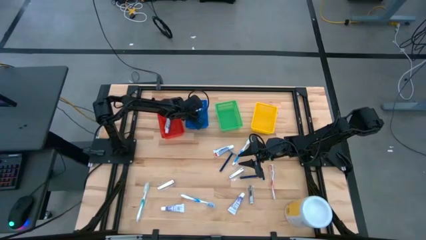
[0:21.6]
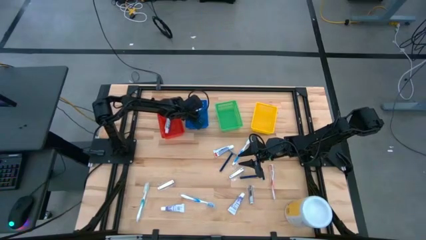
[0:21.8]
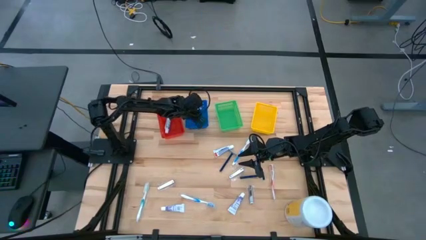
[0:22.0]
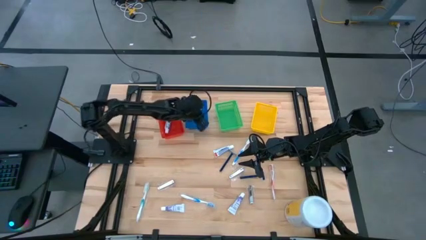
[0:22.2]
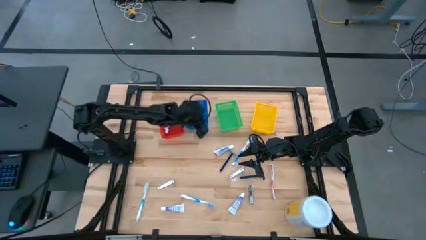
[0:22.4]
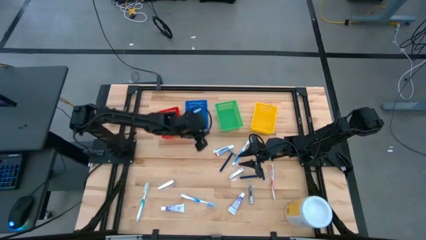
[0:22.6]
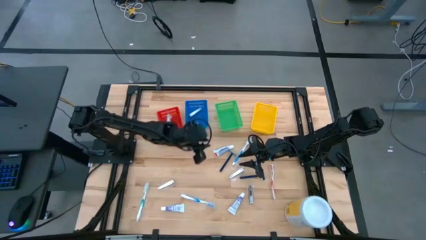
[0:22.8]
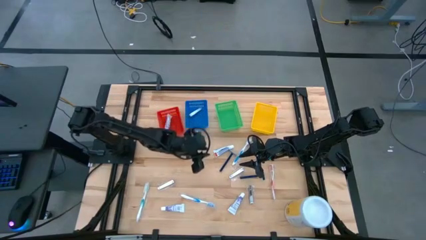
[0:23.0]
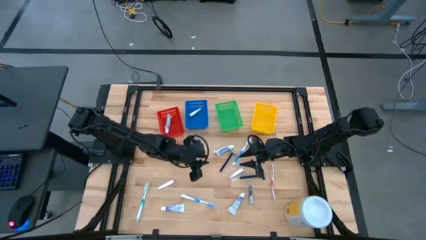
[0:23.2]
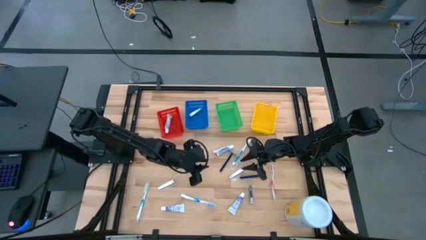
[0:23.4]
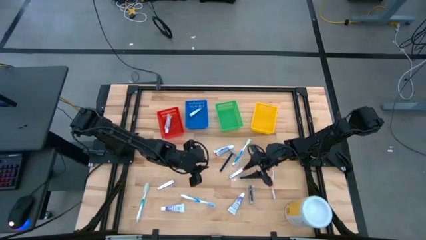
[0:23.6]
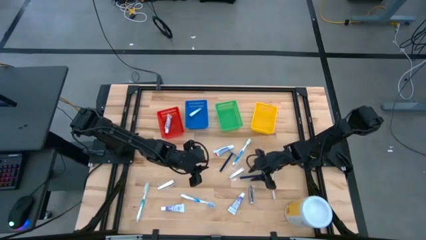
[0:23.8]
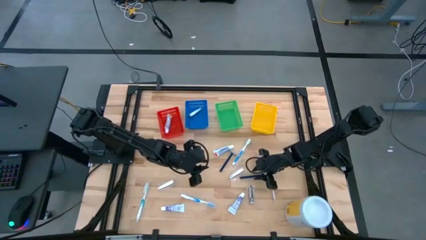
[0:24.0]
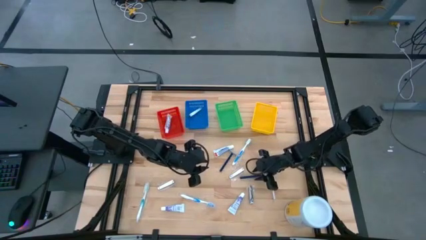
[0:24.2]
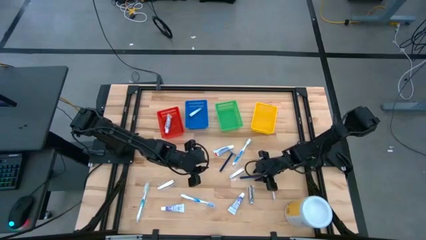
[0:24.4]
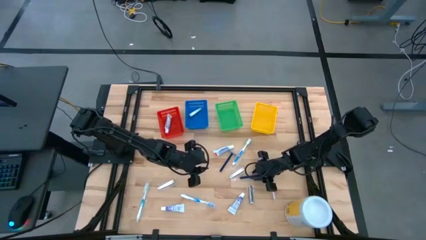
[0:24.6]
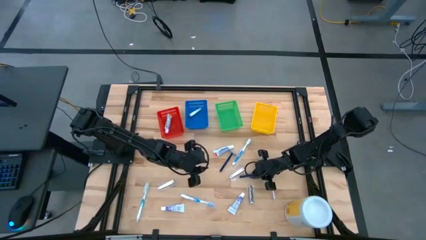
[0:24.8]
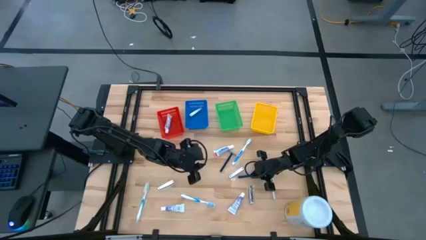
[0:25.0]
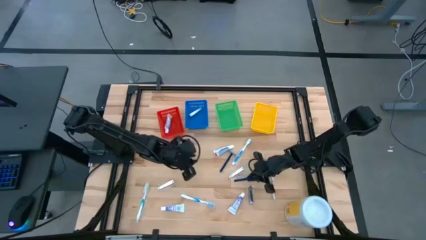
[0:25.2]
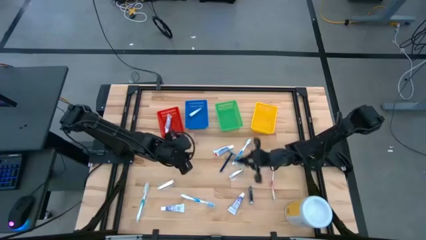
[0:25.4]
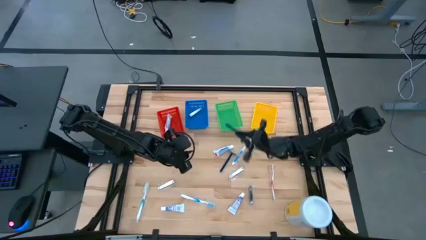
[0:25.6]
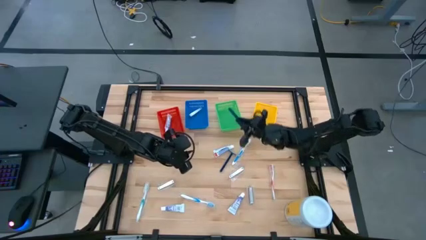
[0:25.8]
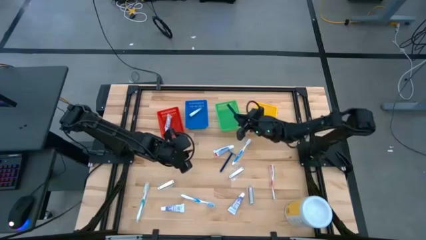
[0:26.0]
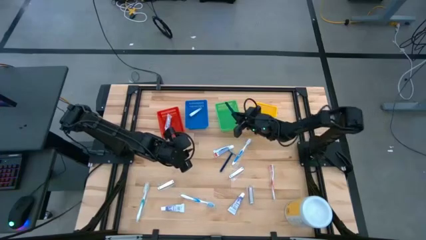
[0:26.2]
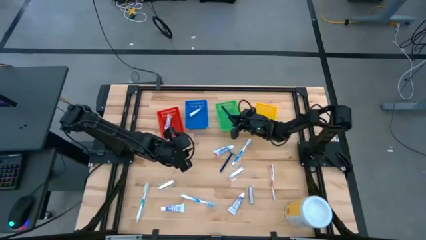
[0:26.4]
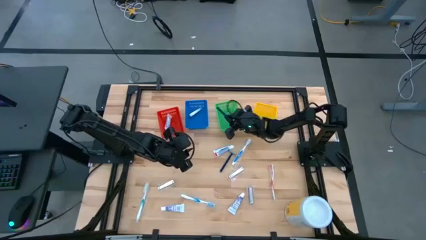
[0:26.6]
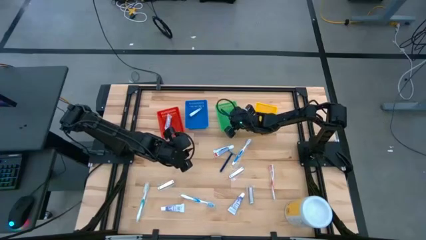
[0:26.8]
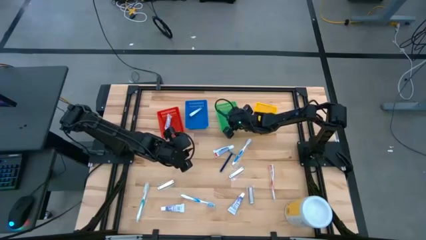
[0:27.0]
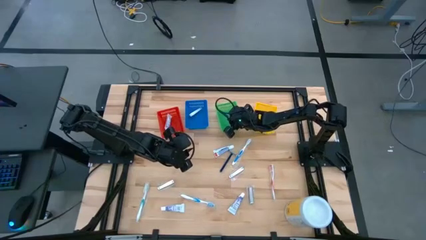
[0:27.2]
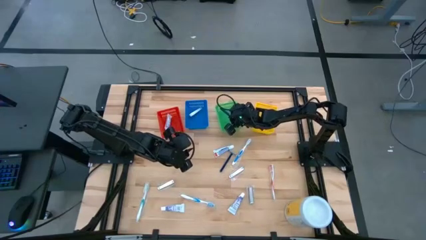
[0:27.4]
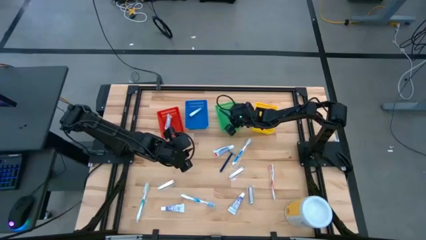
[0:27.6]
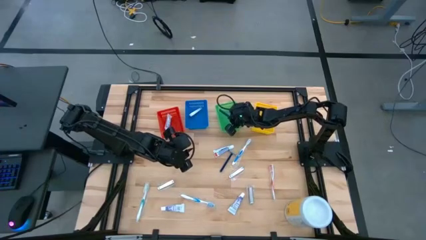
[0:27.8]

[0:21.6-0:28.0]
Task: Pick & Place Travel size toiletries
Put the razor into the green bin

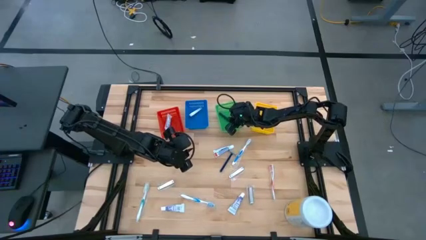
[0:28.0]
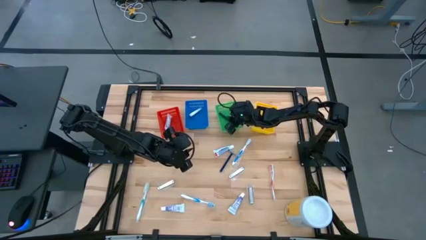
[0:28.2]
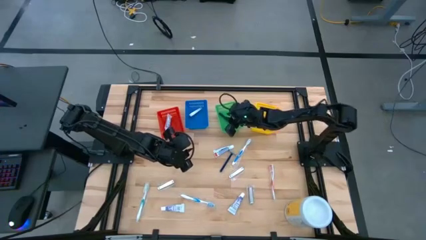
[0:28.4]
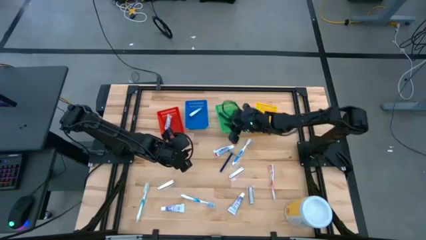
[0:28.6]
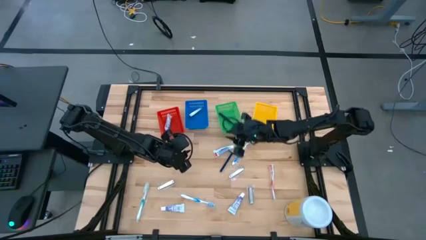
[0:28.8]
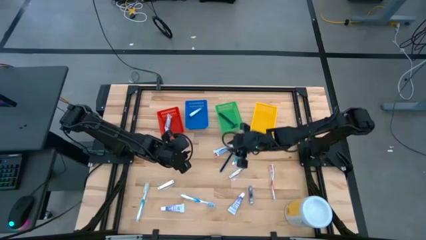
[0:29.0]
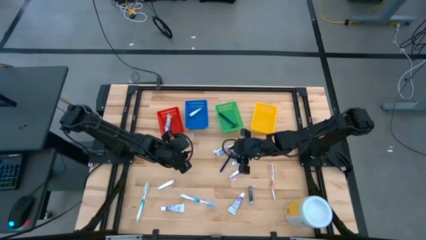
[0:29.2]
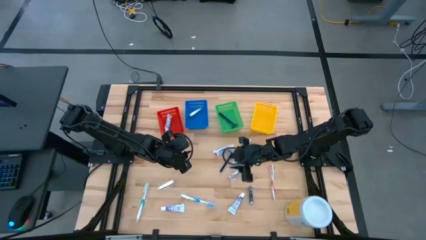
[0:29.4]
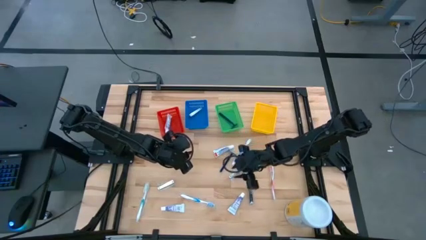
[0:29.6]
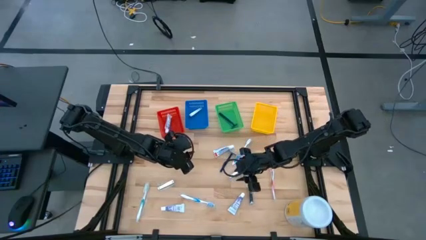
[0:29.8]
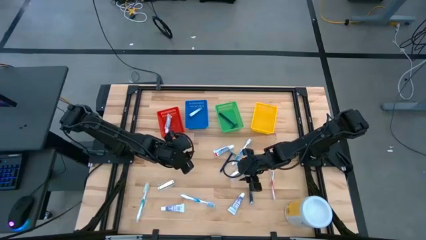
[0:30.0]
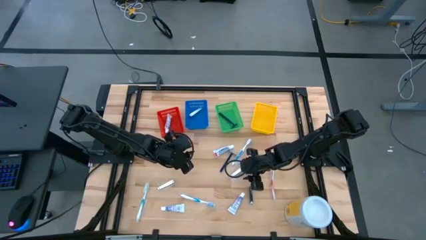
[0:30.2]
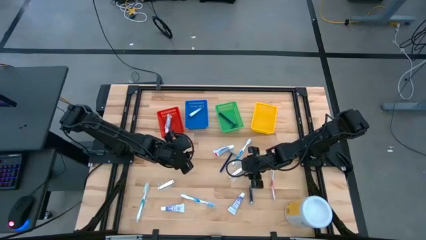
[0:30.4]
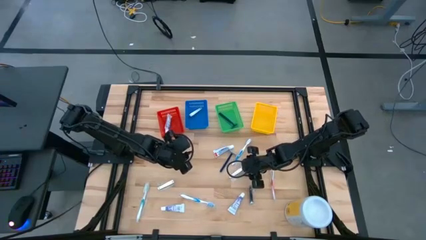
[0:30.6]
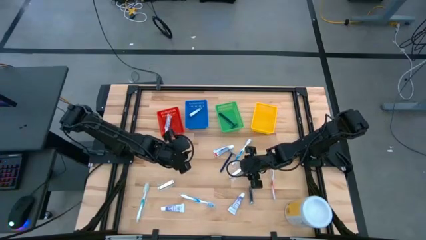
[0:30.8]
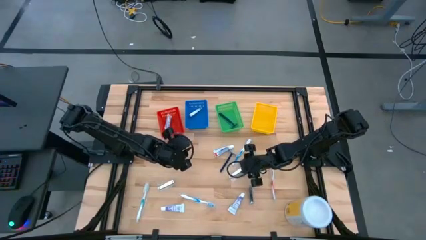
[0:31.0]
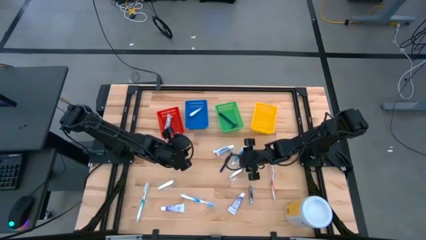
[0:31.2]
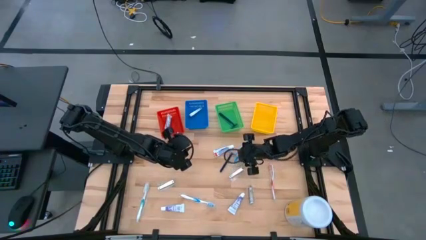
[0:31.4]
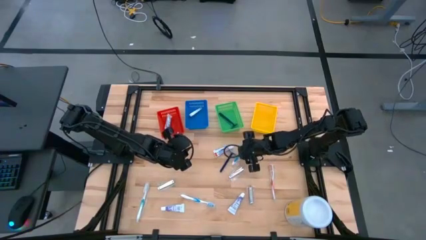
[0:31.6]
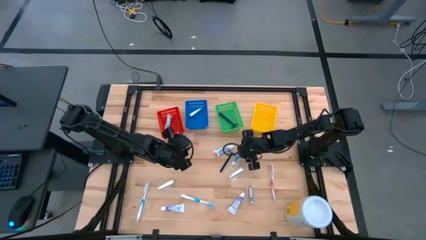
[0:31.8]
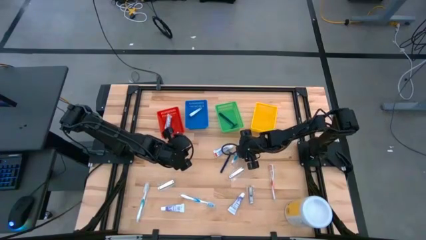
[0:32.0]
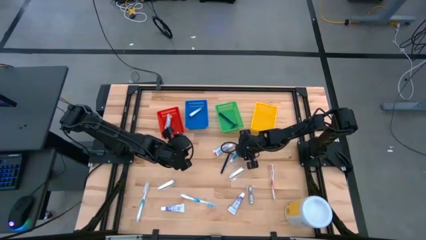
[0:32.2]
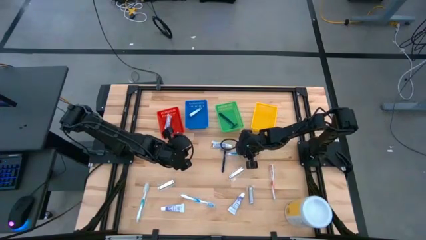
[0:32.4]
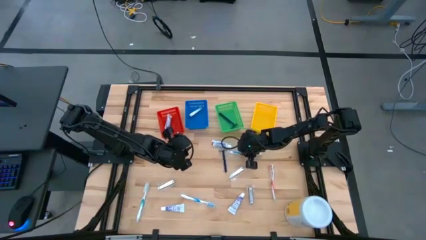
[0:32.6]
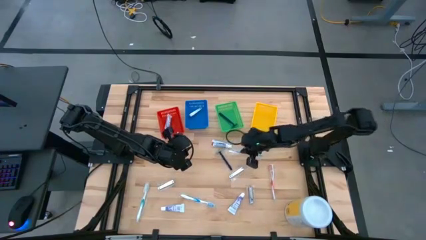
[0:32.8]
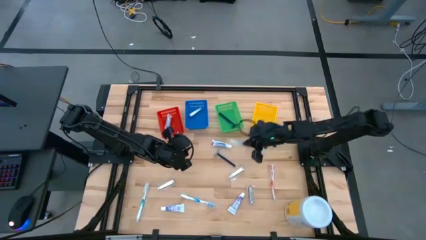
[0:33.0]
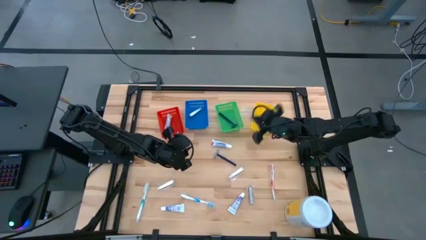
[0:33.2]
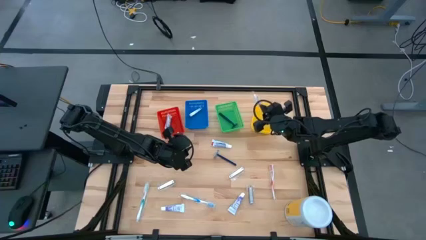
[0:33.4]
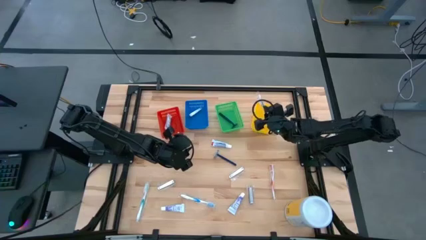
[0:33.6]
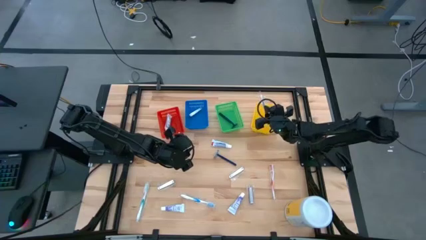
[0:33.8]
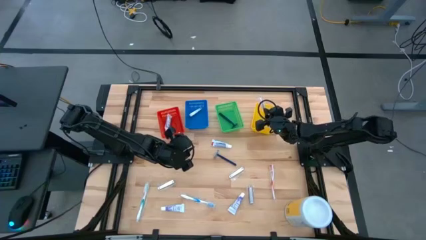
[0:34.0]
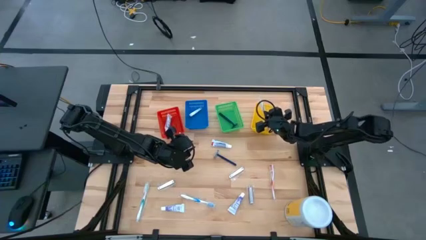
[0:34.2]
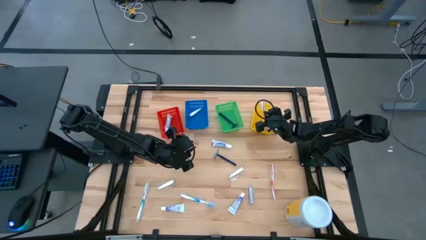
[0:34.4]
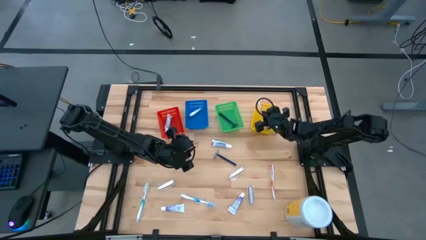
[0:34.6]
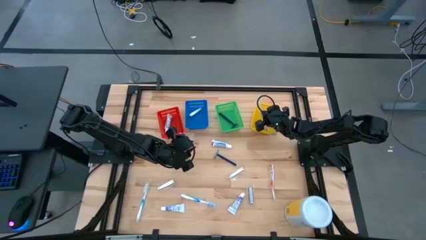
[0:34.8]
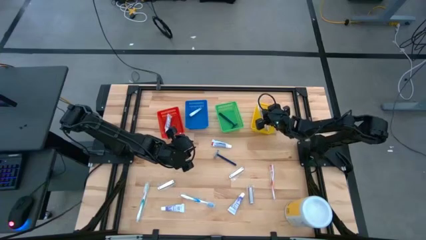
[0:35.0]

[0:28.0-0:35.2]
Put the blue toothbrush into the yellow bin

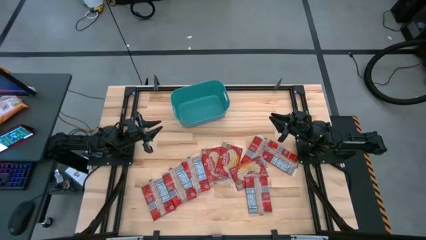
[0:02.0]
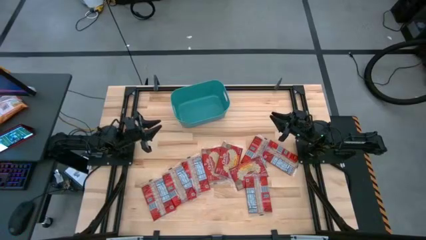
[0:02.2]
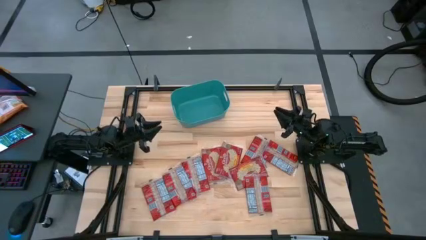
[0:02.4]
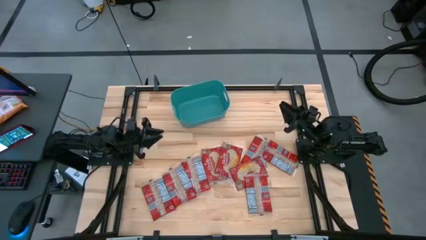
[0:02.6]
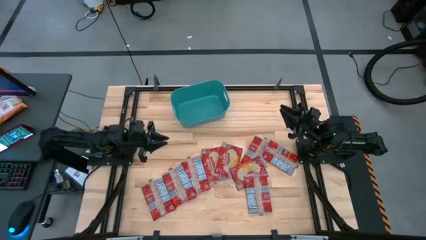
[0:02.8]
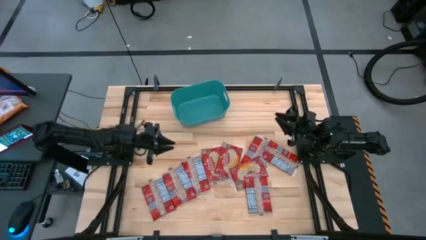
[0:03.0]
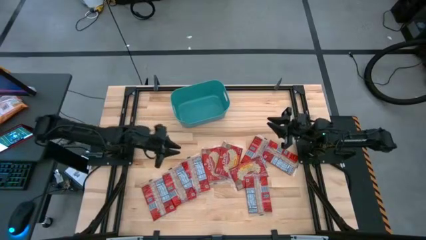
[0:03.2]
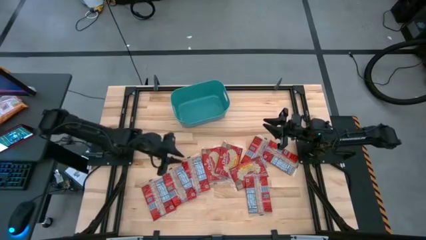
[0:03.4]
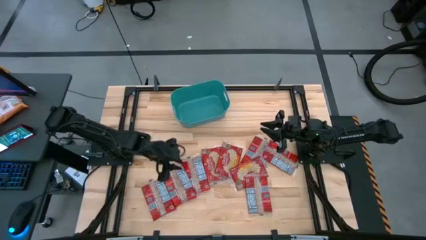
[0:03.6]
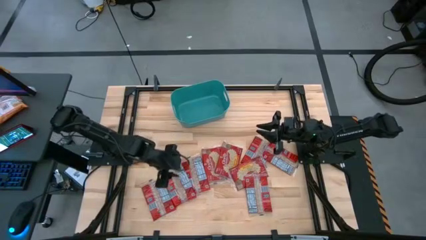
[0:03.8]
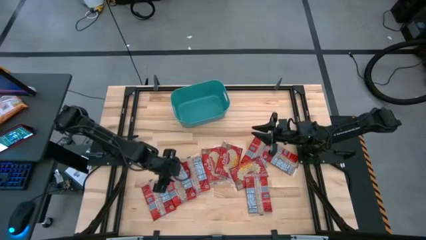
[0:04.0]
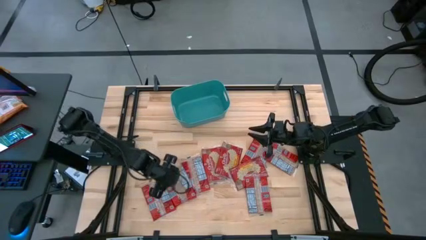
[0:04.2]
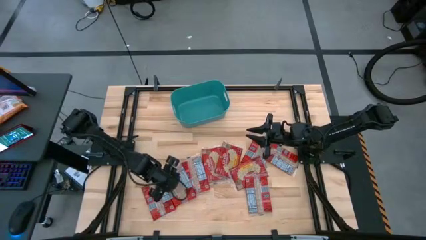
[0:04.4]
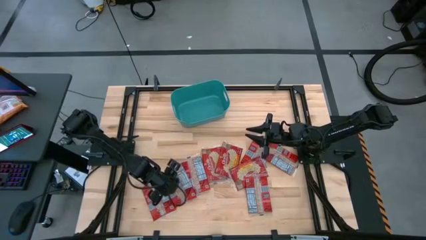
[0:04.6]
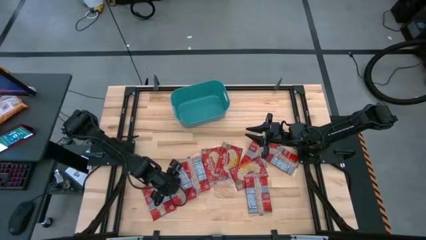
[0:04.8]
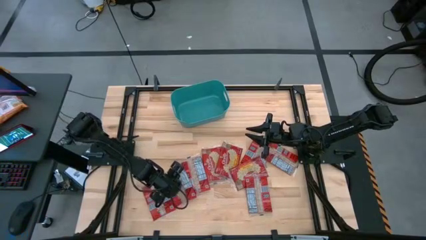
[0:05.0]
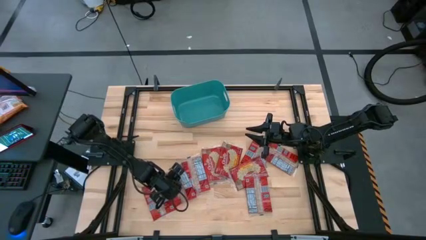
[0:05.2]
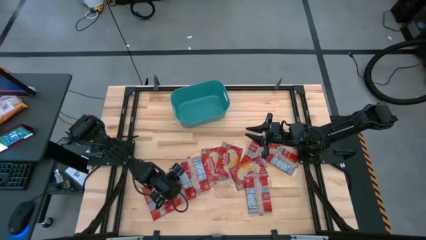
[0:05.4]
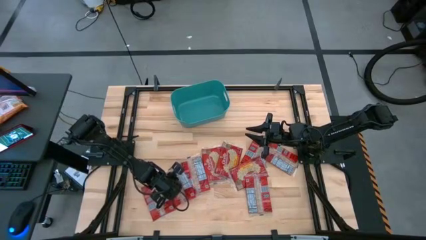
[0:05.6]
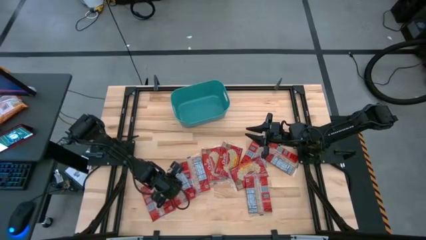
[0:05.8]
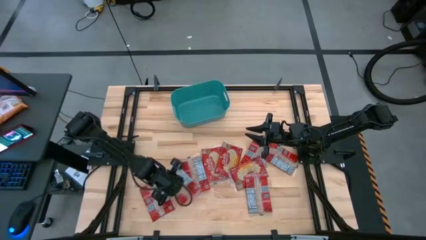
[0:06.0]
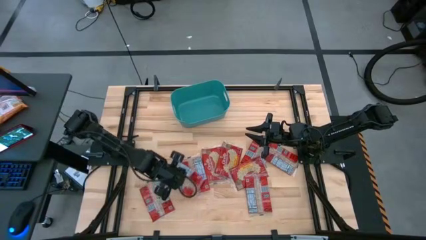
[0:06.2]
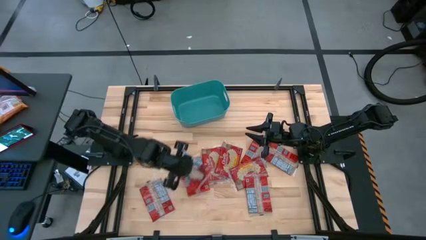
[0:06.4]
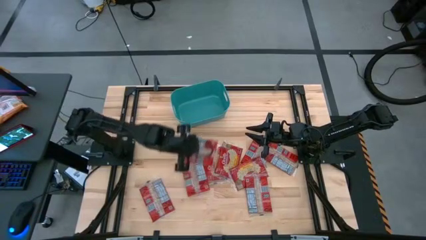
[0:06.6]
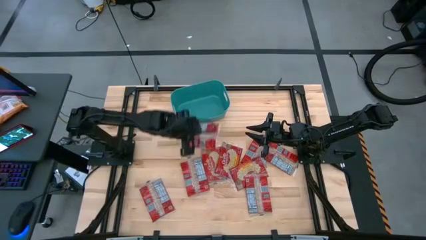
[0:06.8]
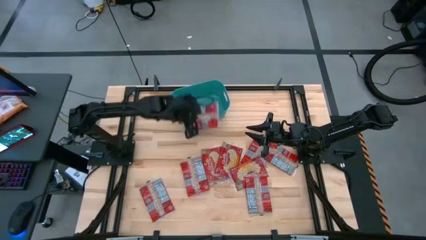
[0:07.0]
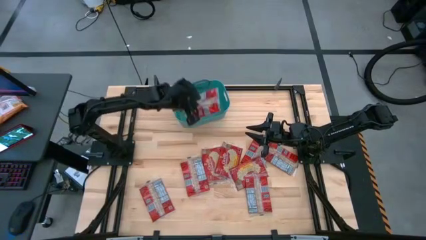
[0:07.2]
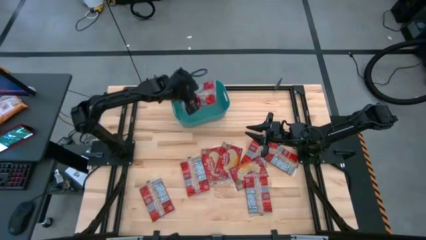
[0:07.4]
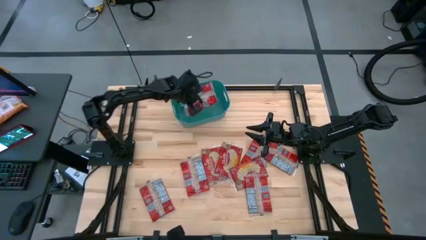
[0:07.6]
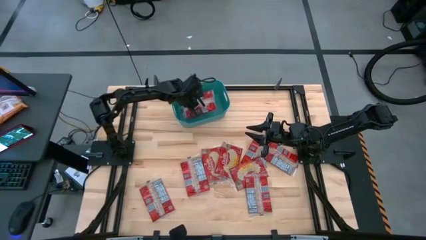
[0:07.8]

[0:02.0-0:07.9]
Task: Sort popcorn bags into baskets
Put the red popcorn bag into the green bin
